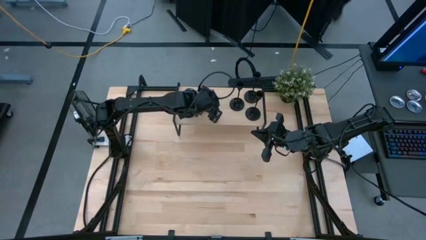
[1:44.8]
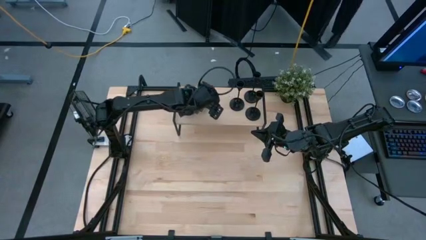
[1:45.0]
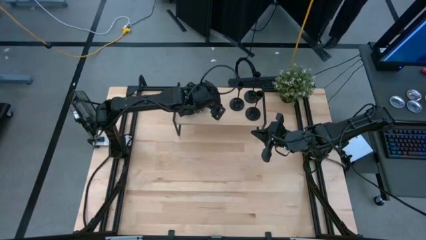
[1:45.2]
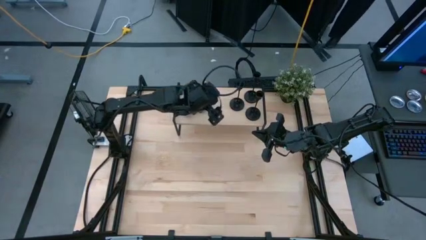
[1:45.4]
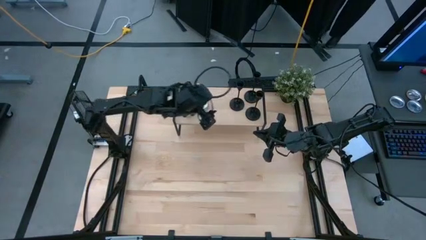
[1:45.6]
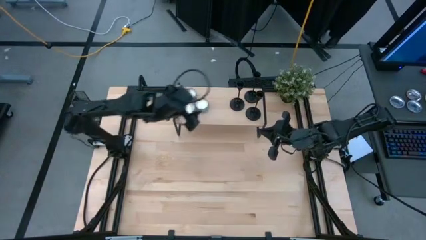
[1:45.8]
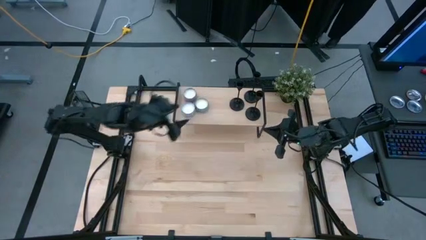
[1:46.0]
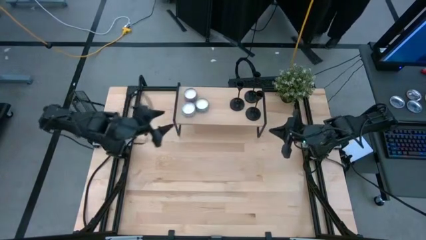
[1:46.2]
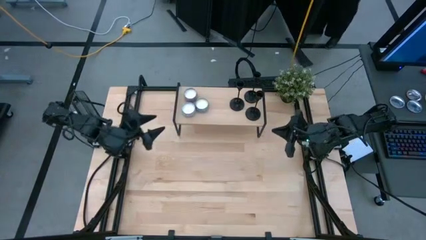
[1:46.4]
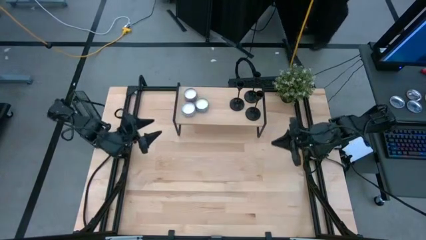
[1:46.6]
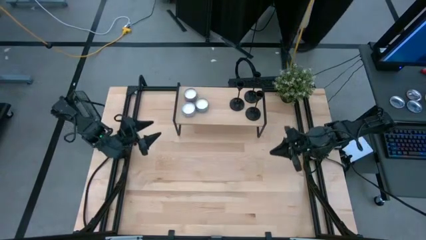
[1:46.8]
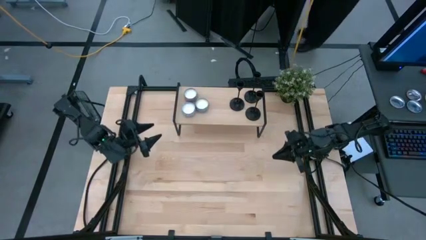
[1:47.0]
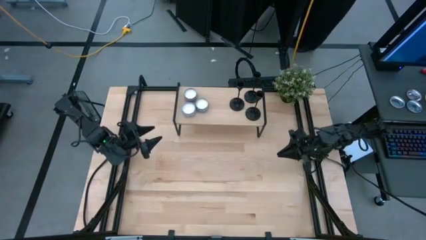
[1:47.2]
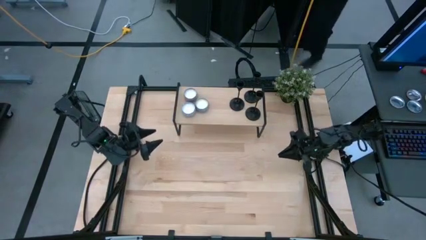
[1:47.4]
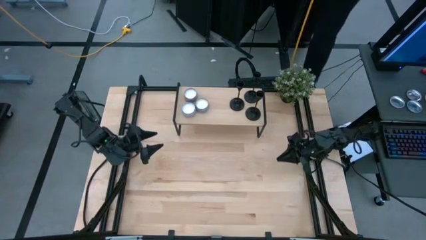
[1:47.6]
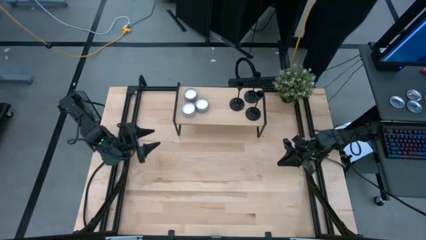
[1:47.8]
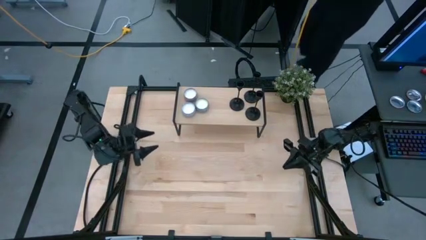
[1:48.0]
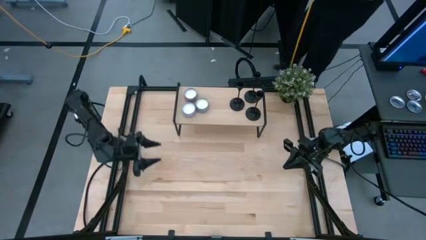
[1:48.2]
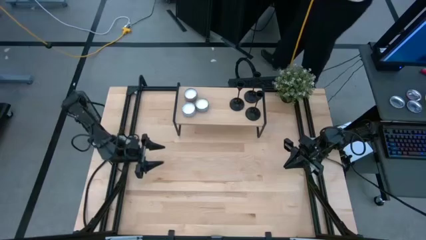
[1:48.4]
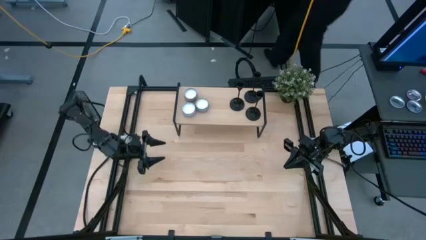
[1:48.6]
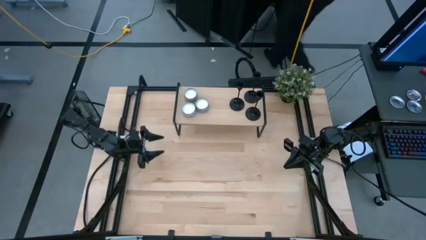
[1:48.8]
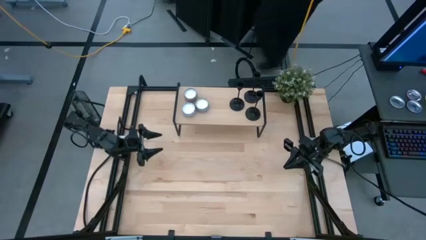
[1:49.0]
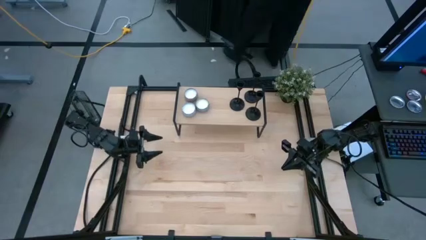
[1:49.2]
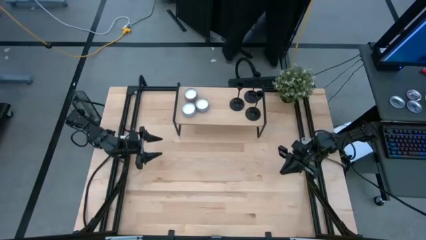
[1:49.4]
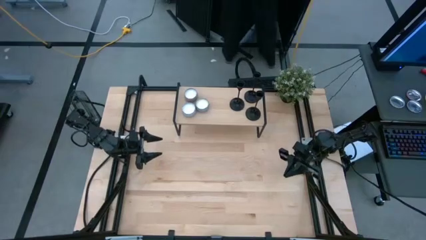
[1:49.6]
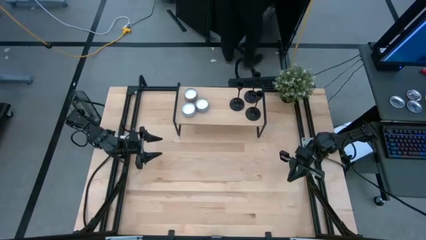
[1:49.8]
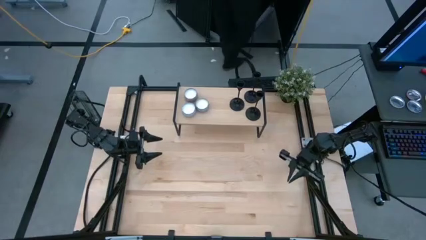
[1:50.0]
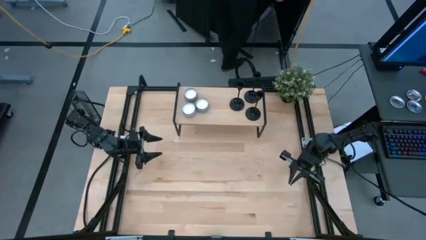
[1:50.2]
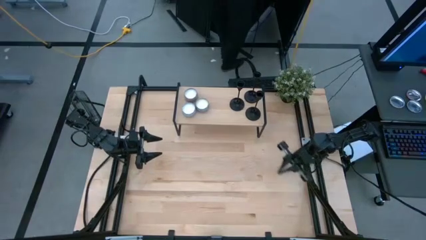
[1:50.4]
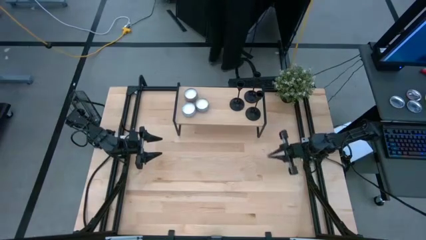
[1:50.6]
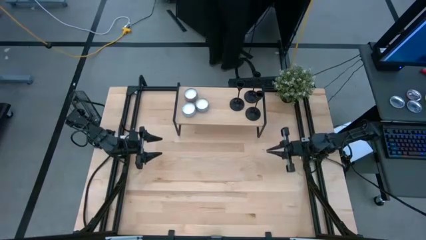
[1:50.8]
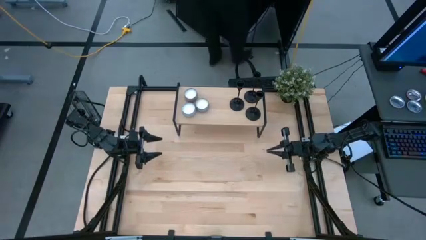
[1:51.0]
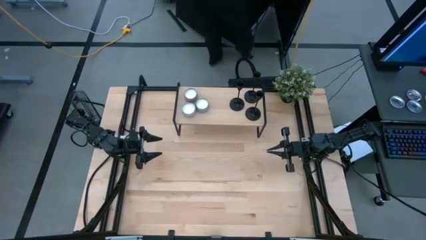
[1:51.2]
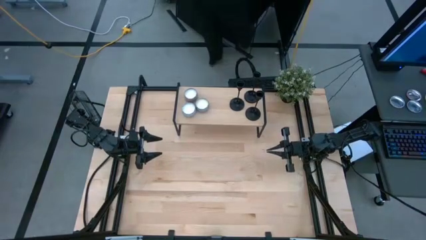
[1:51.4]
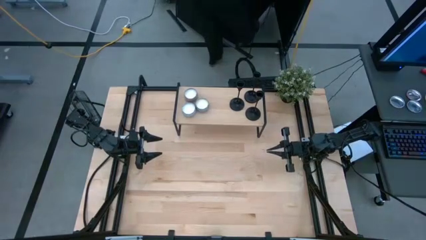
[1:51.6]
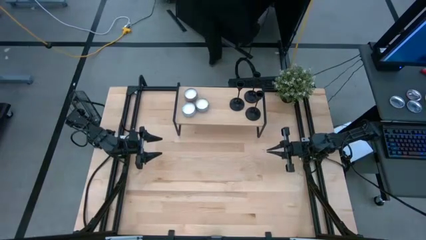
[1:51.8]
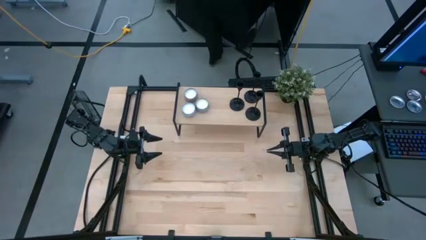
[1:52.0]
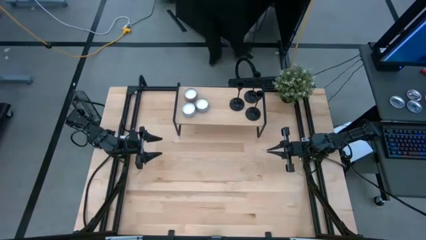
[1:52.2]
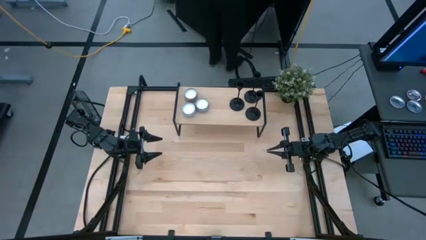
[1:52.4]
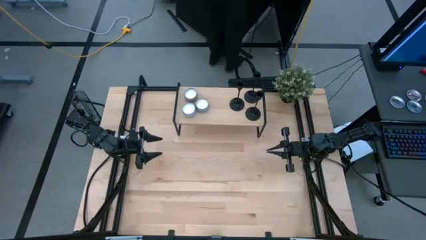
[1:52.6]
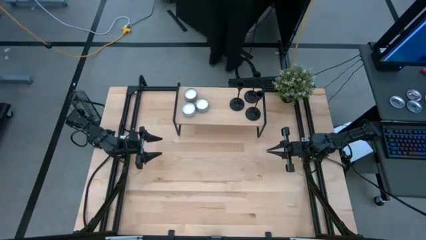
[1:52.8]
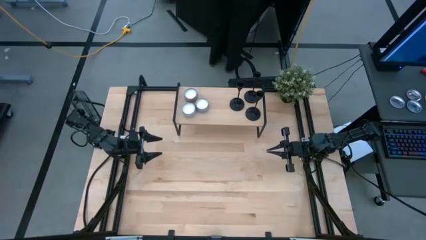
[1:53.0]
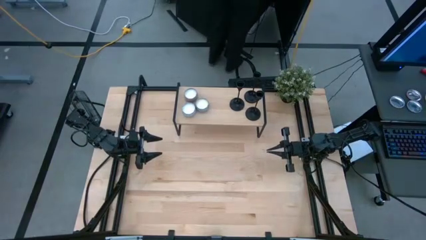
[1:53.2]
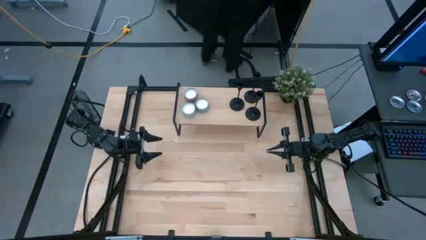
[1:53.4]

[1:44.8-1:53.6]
Task: Pick & Place candle stick holders
Return to Home Position

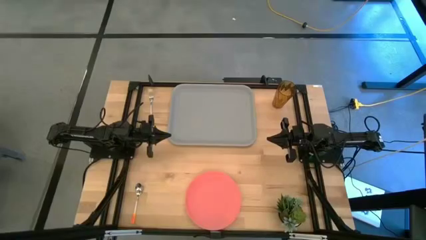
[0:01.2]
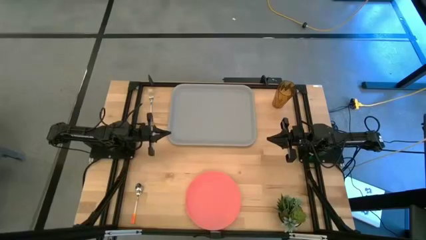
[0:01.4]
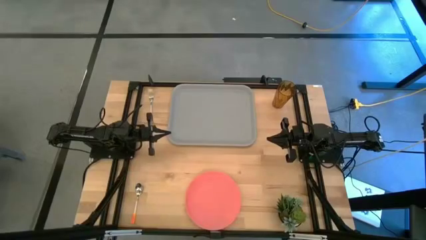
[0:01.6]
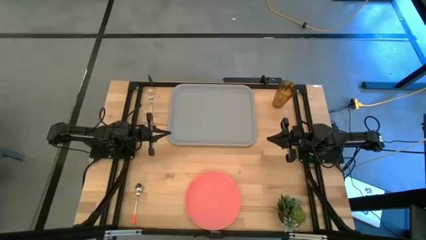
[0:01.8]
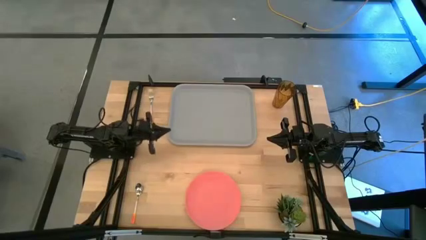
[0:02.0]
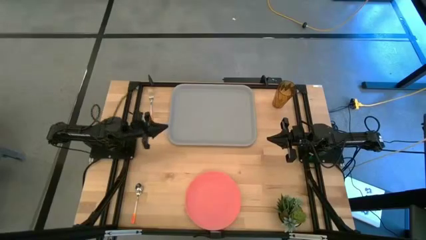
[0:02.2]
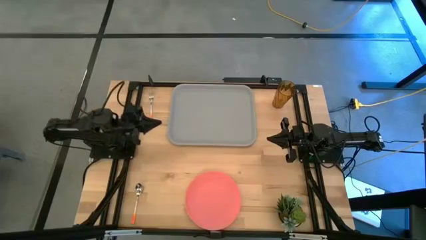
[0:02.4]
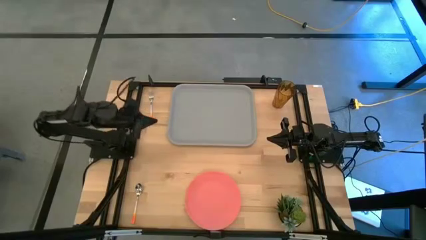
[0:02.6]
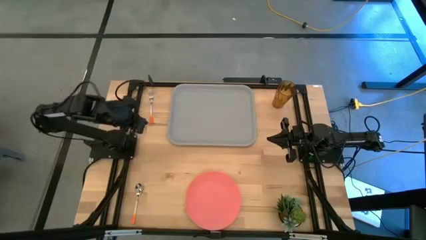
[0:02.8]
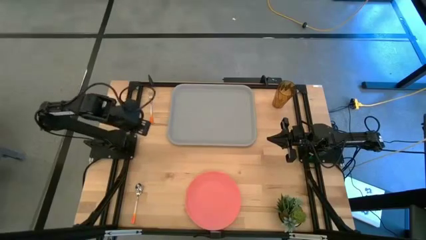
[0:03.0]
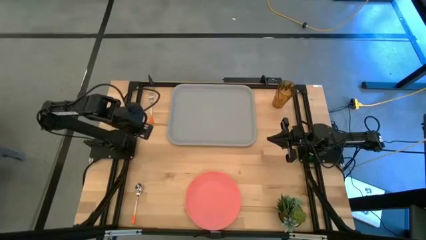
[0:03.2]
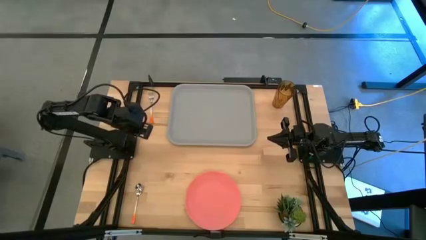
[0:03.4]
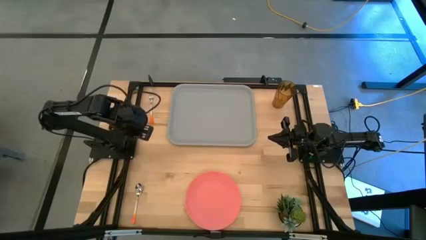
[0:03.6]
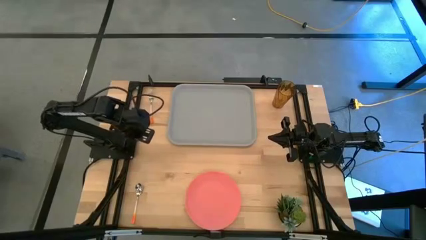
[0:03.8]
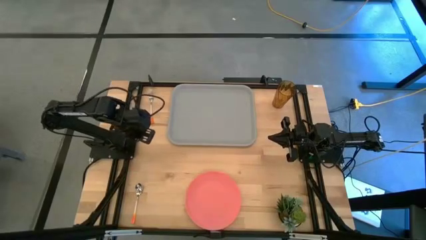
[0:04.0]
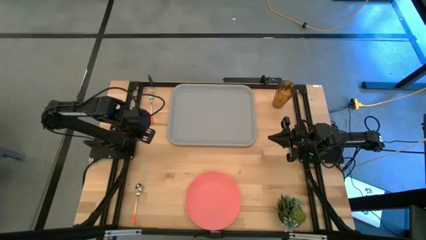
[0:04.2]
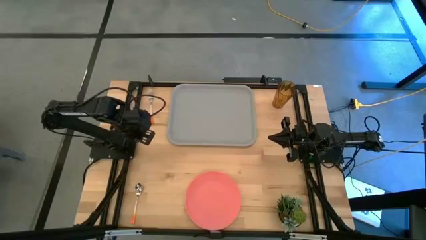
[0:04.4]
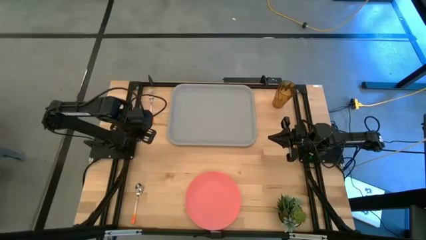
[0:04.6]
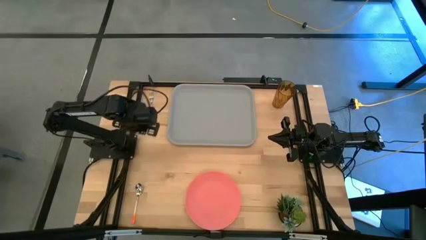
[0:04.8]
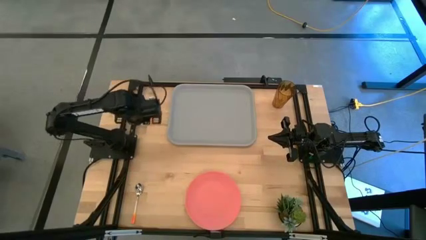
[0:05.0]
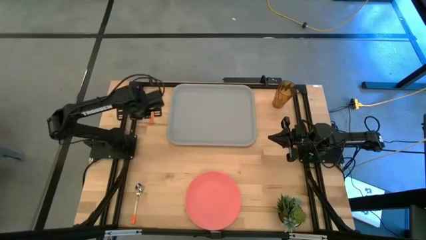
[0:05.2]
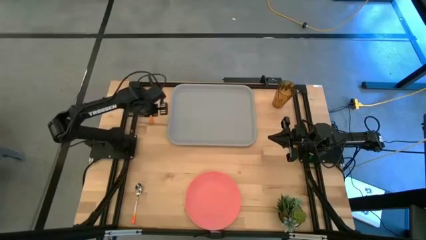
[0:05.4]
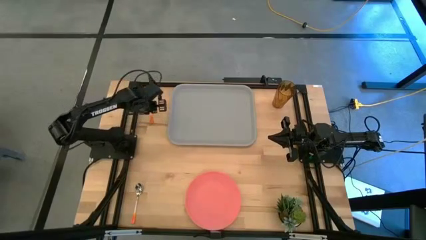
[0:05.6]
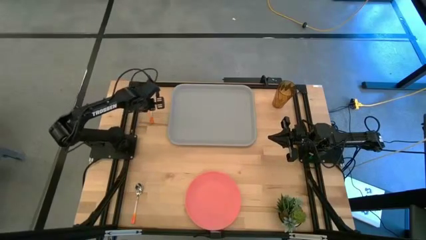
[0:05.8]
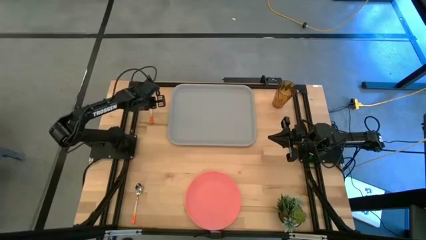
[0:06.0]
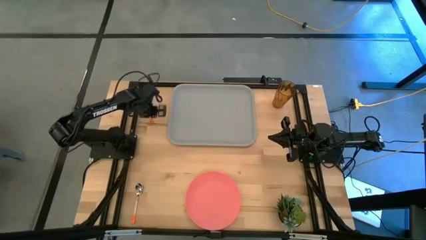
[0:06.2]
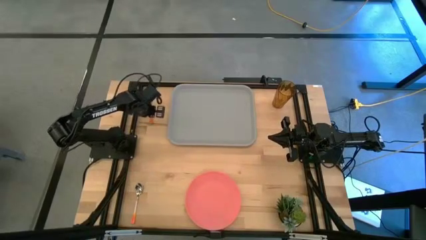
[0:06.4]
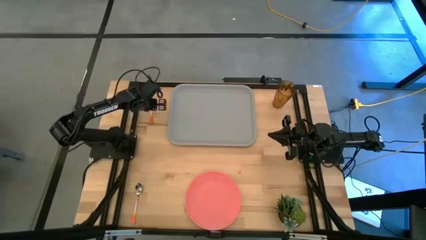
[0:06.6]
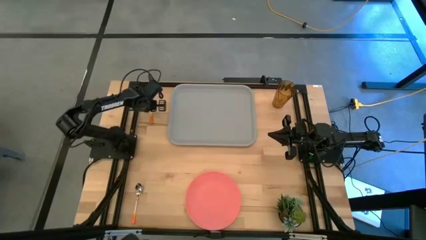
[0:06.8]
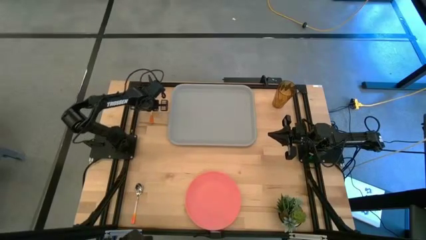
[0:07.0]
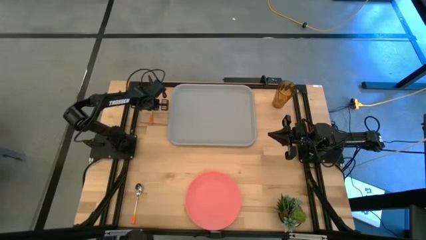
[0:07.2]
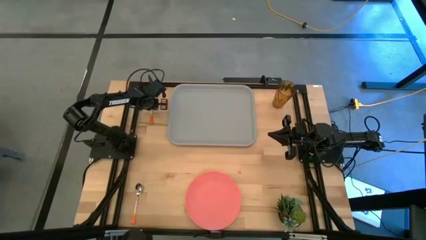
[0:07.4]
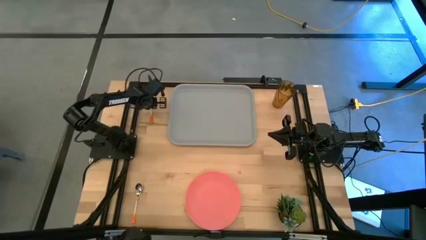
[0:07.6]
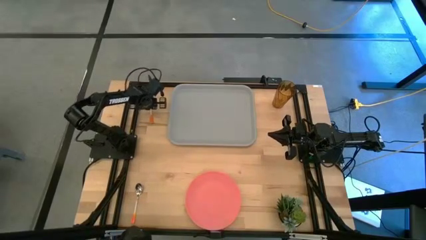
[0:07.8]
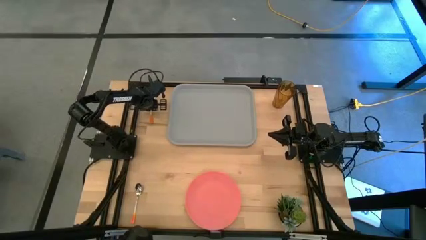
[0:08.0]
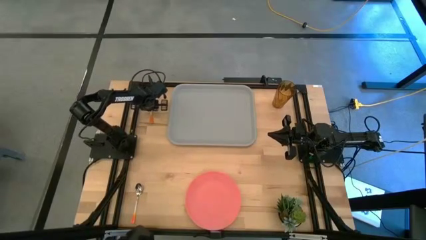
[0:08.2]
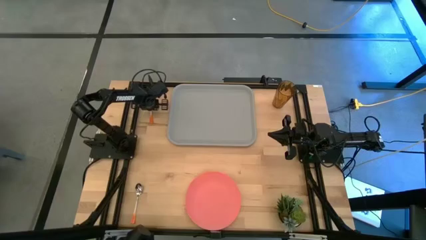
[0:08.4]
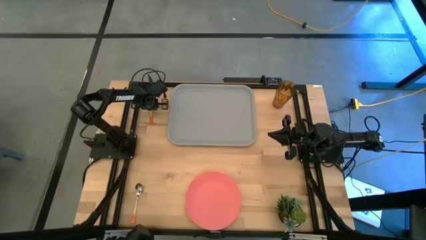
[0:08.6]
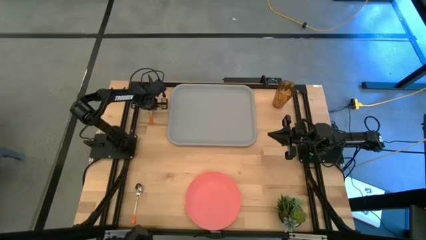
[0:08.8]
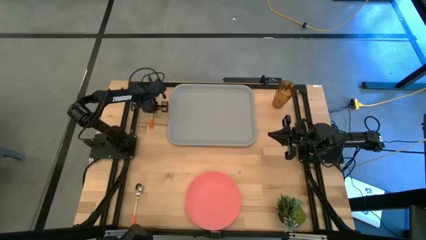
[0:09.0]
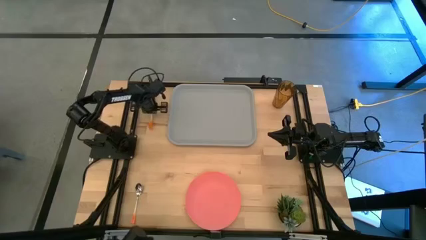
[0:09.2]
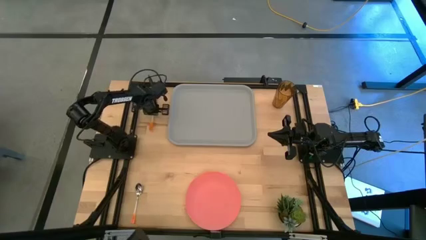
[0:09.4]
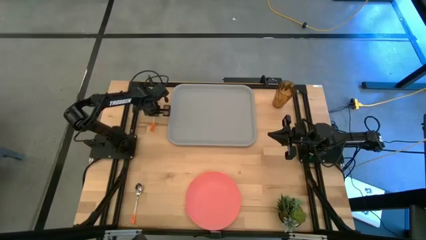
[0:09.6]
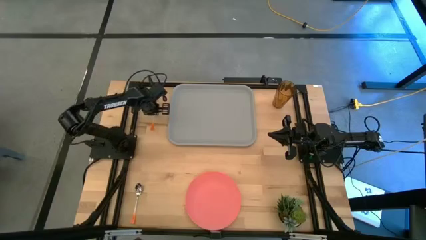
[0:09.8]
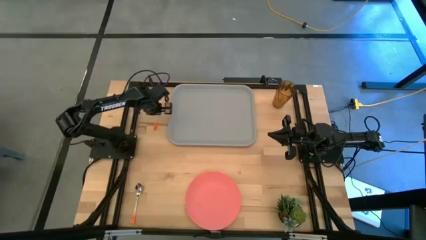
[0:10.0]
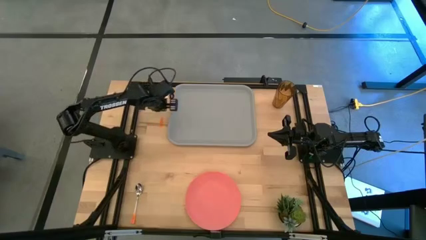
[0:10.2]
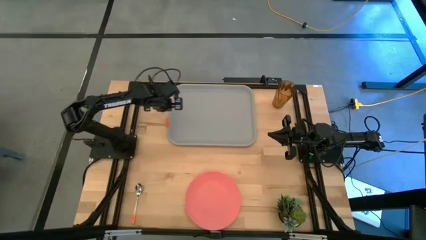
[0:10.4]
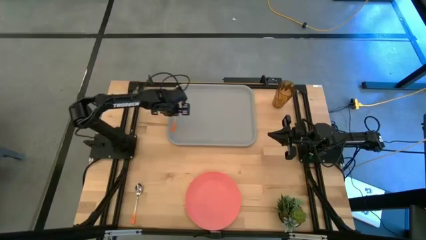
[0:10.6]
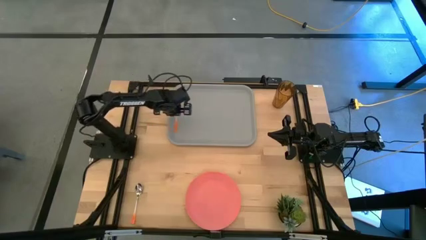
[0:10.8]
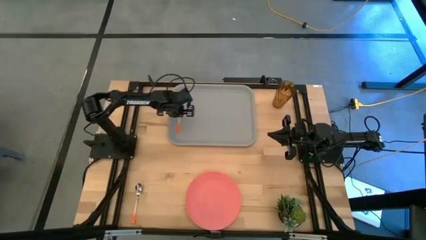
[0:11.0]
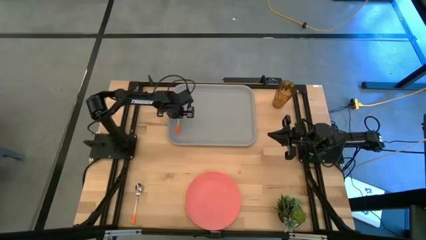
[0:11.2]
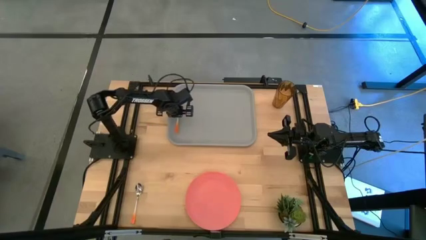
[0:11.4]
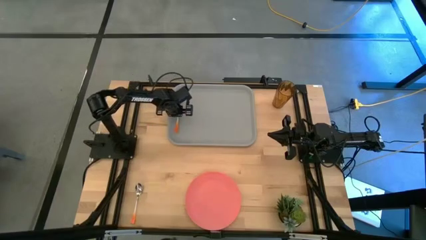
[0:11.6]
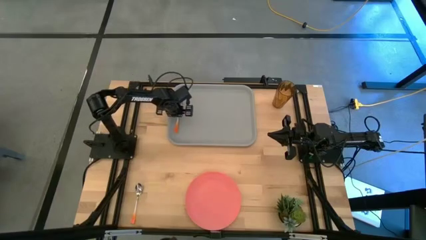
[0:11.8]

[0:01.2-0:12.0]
Task: Pick and place plate/cup/fork/spoon on tray
Put the orange fork on the gray tray
